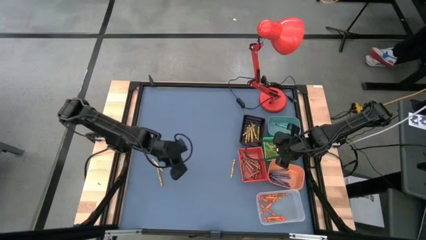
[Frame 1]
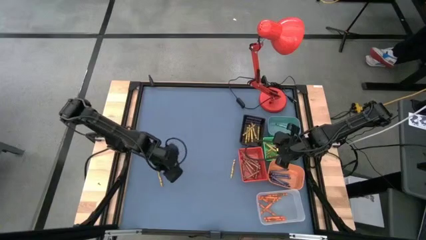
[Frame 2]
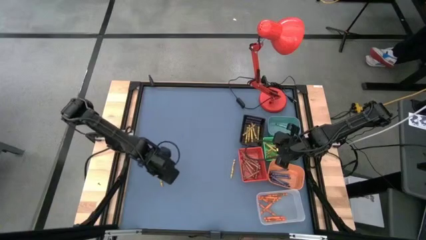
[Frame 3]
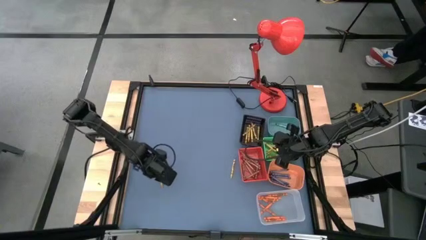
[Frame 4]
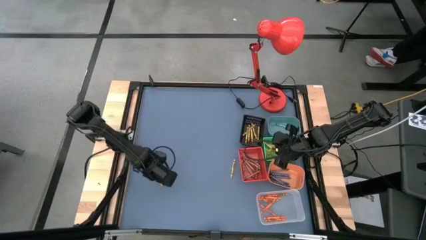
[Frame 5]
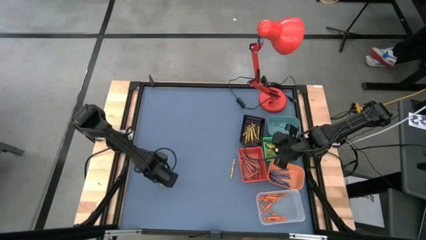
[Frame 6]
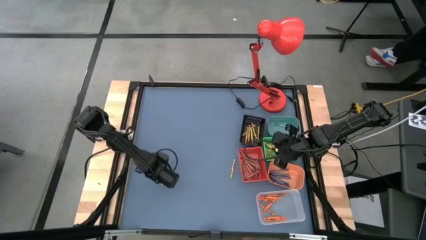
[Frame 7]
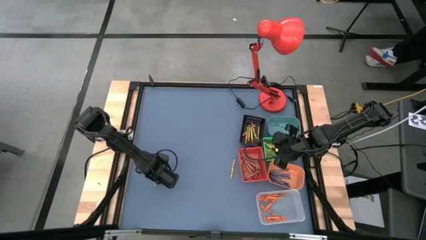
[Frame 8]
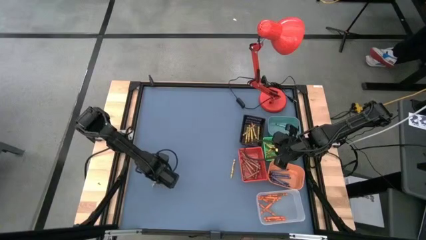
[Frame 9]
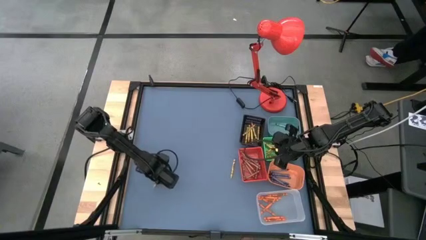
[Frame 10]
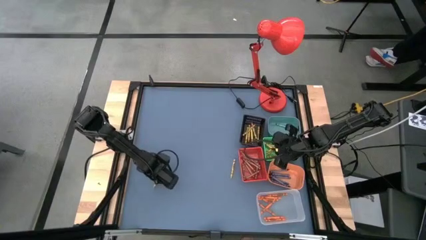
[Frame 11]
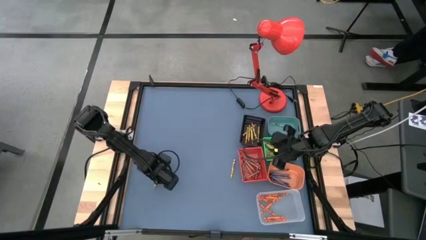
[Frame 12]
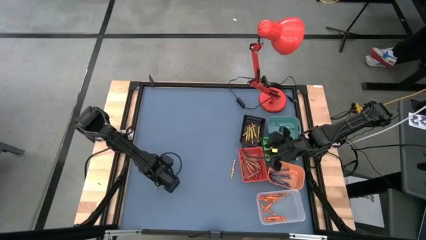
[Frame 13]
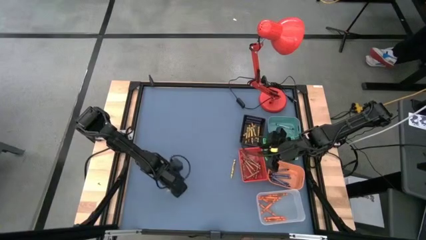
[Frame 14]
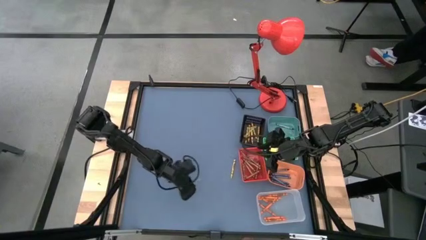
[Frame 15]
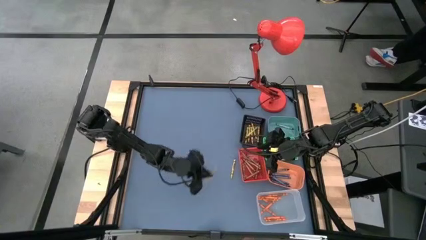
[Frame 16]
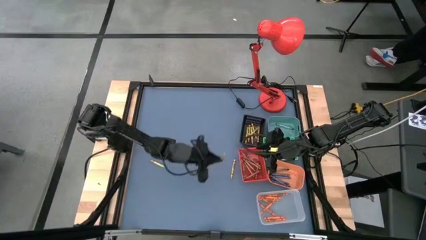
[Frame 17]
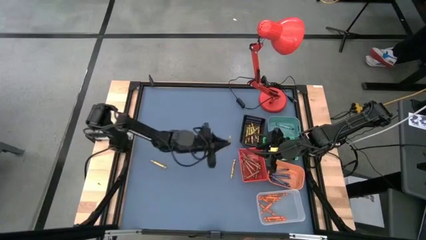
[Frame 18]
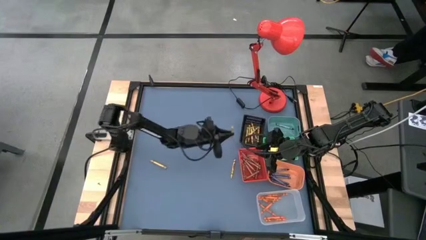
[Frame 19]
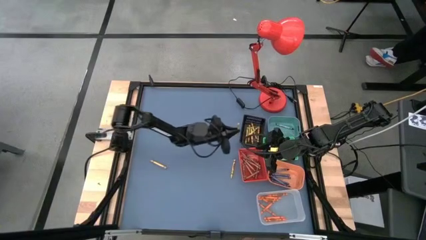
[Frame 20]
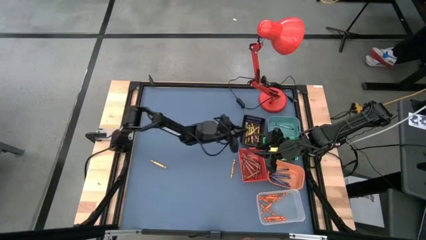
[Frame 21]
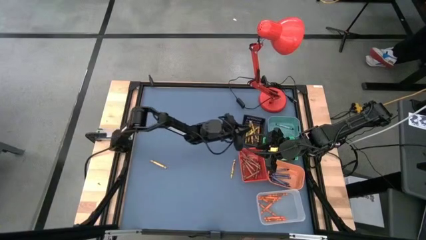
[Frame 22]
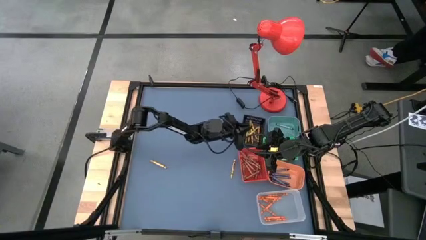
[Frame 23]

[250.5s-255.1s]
Task: Sort crayons
Put the yellow crayon into the black basket

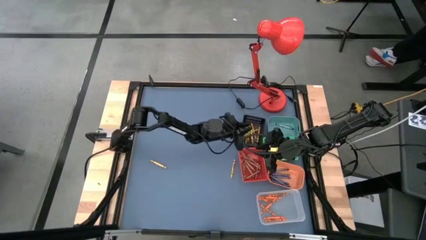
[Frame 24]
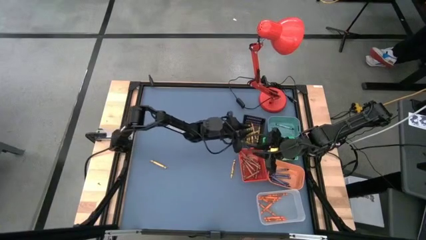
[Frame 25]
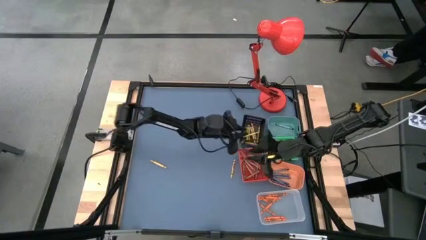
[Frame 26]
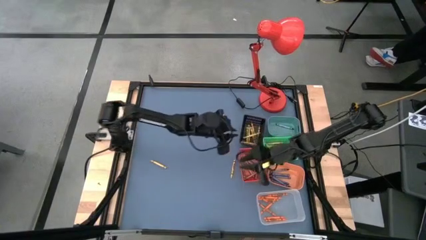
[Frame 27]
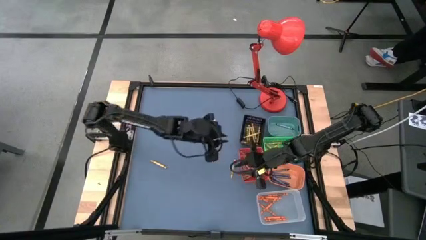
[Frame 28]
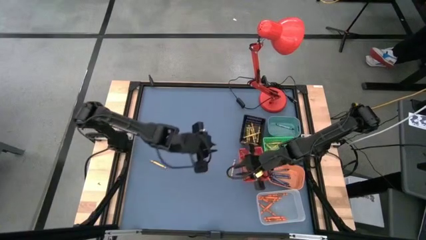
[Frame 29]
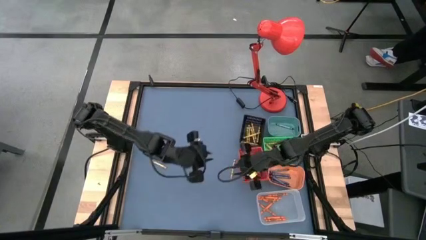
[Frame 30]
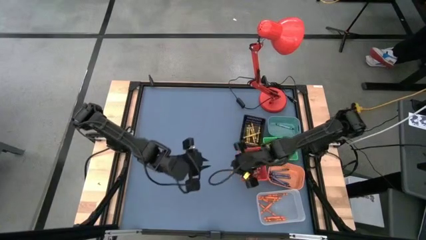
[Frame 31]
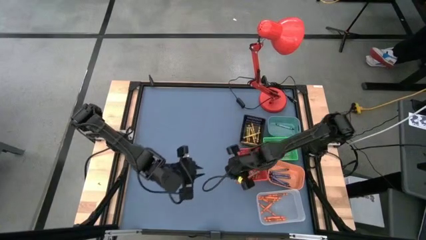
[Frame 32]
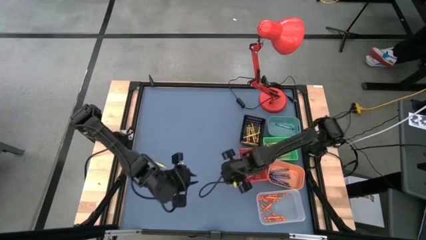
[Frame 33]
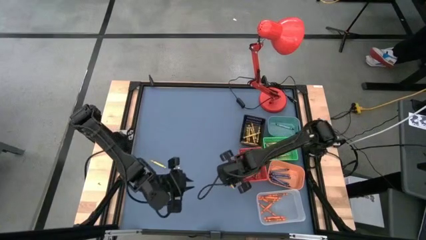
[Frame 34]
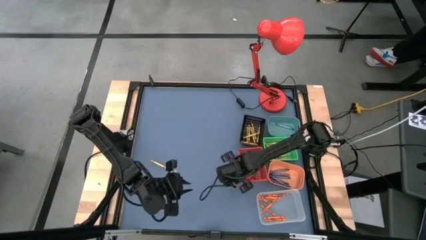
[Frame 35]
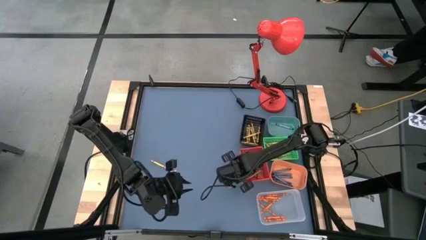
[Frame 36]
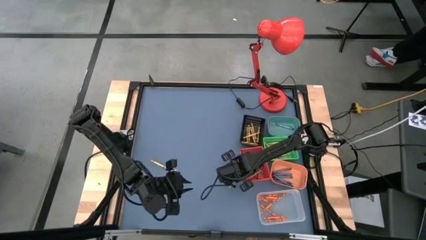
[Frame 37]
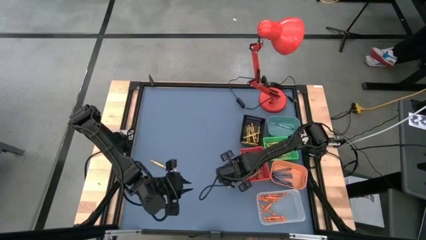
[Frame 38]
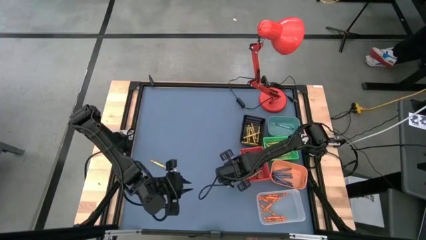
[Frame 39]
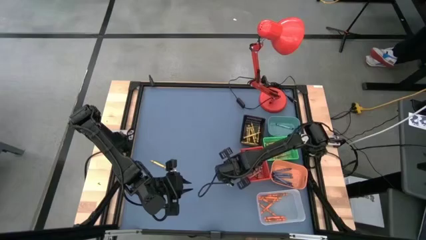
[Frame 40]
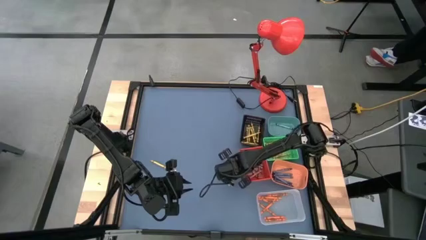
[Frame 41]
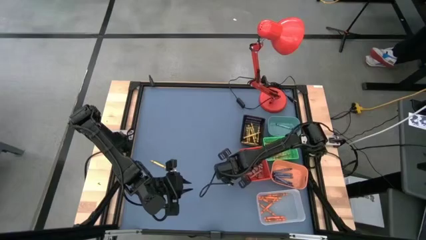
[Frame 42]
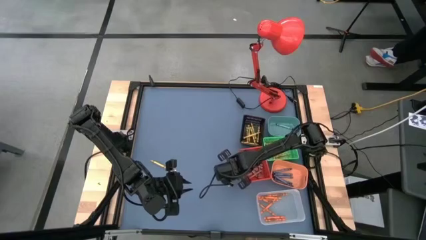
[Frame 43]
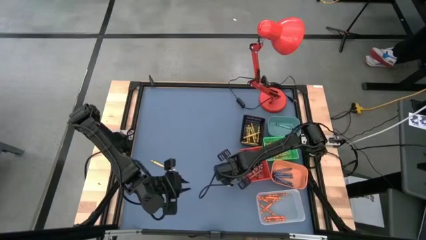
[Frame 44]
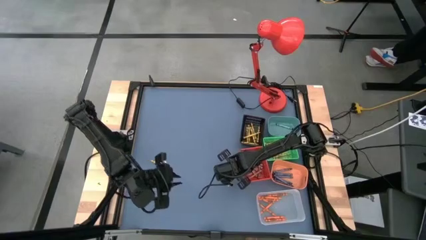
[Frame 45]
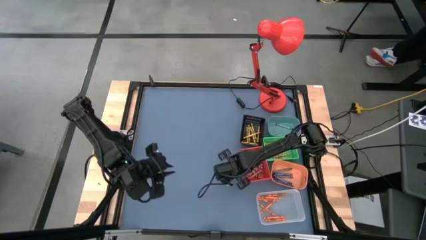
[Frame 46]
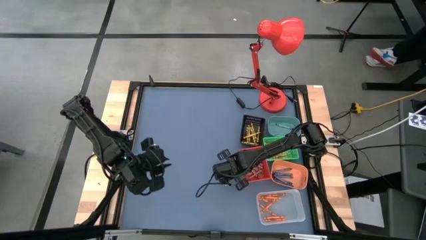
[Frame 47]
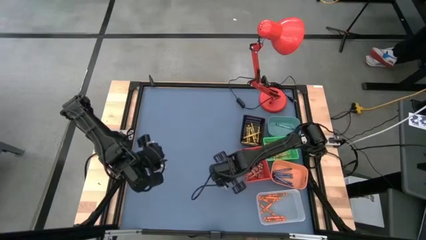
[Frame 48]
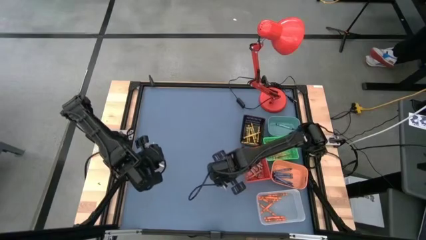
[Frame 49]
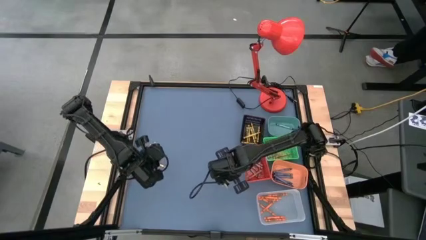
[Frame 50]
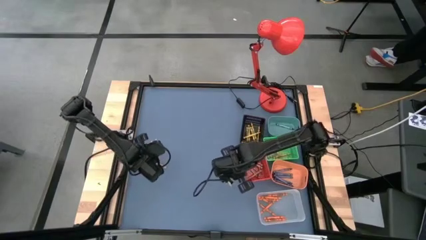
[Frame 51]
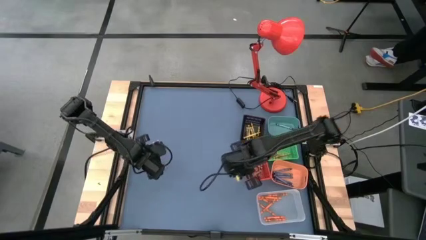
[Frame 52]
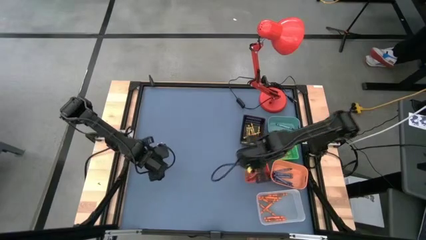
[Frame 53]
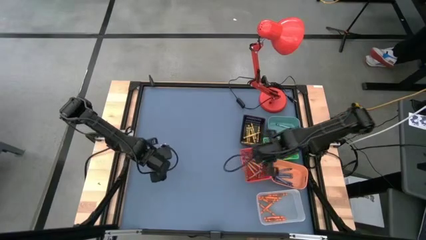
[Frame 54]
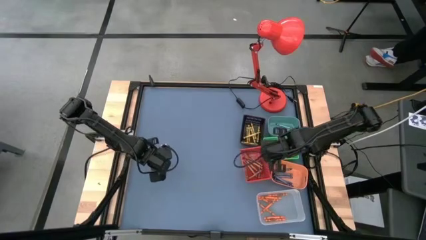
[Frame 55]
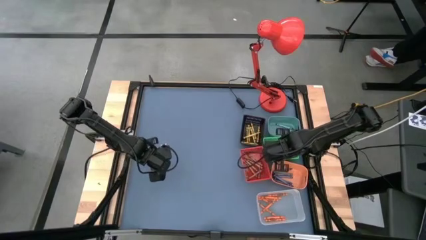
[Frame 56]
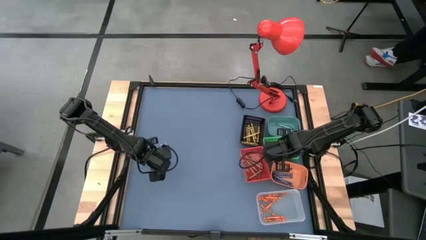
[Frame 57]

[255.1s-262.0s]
Put the yellow green crayon into the green basket

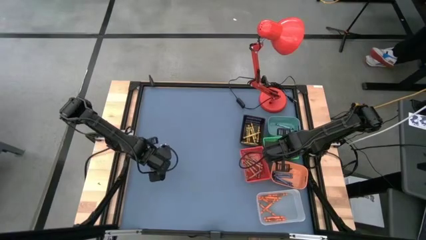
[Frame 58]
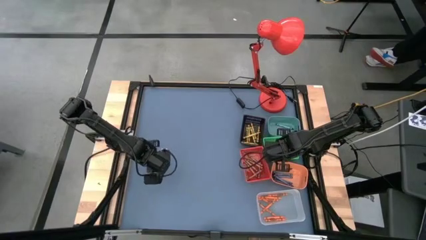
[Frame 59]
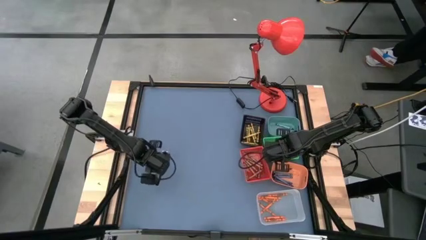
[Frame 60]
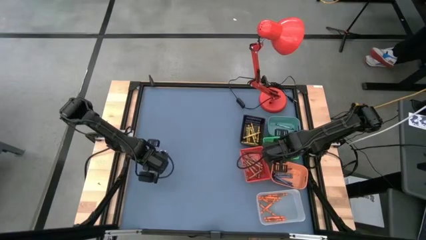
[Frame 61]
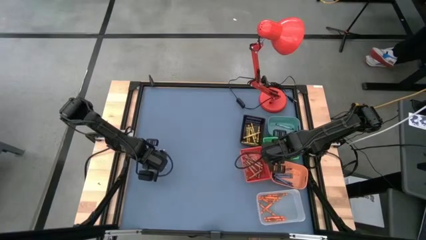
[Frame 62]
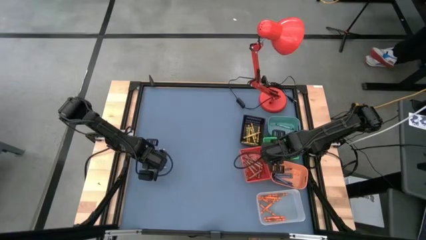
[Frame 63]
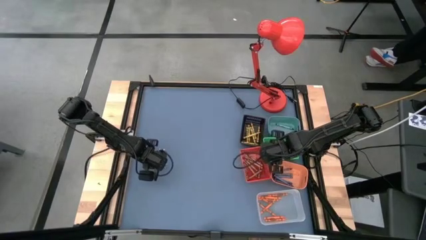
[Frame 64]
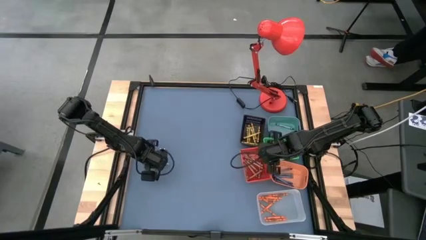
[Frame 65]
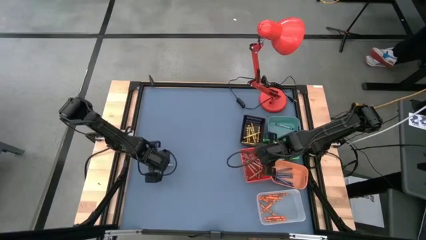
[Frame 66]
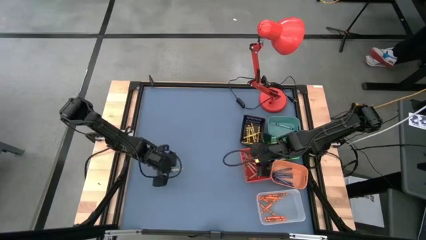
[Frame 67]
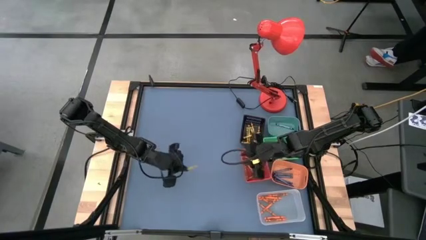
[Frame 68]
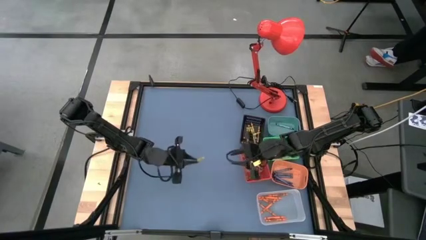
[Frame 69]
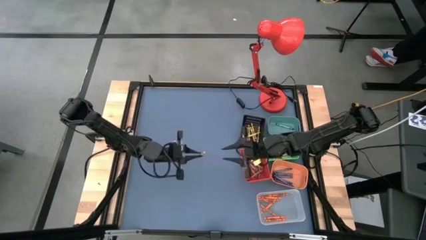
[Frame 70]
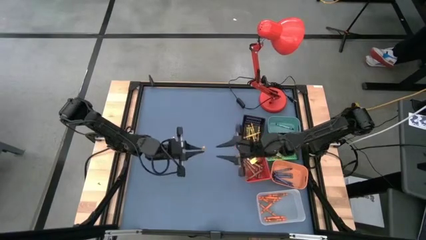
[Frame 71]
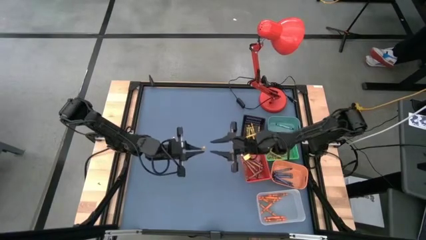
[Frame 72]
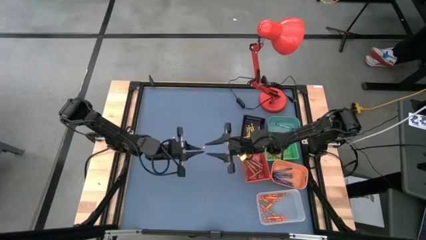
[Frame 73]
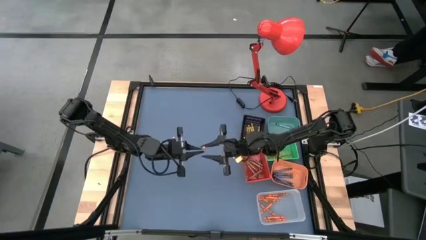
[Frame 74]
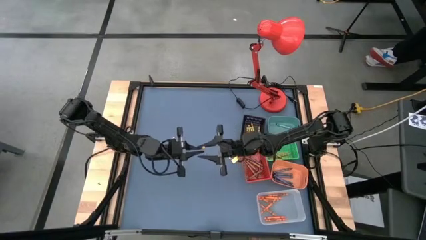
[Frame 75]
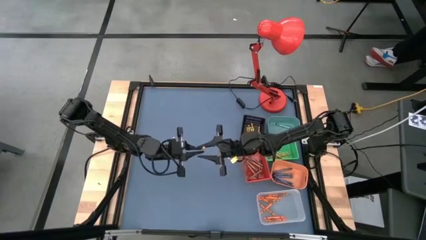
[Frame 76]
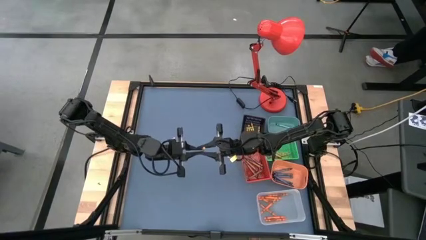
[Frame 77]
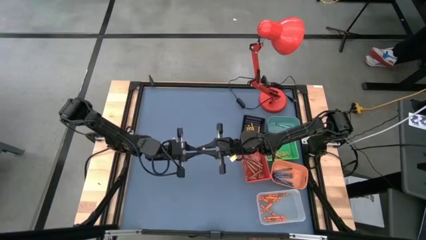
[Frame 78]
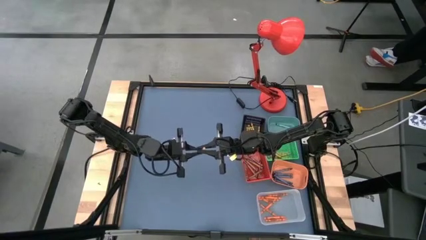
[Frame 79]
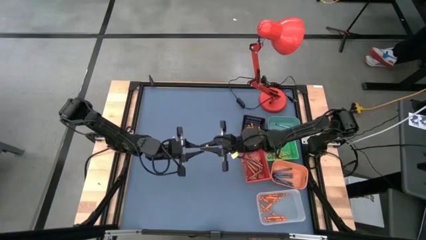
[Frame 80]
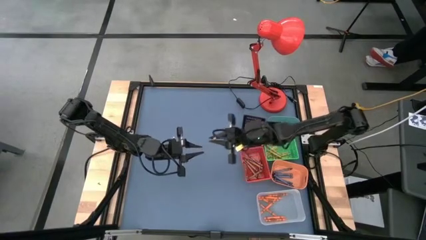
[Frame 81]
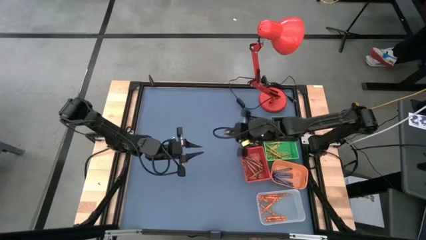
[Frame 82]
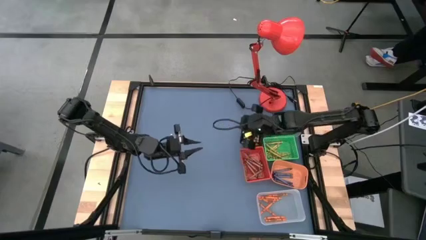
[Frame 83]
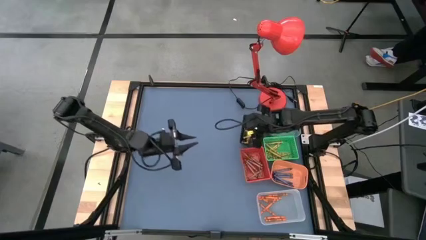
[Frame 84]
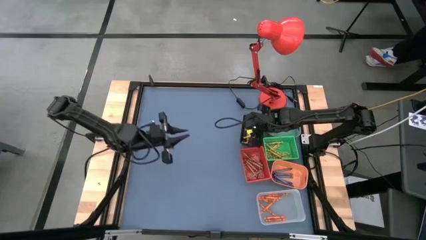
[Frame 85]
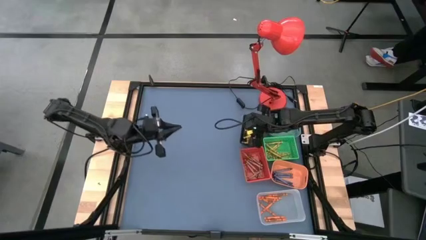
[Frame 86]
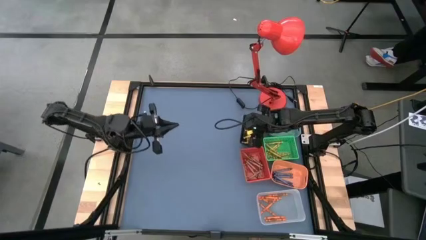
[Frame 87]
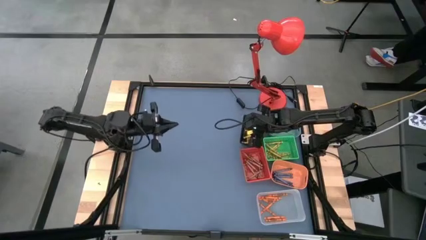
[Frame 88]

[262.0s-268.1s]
Put the yellow crayon into the black basket
